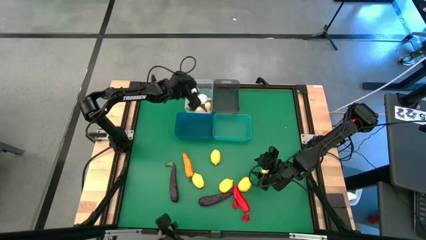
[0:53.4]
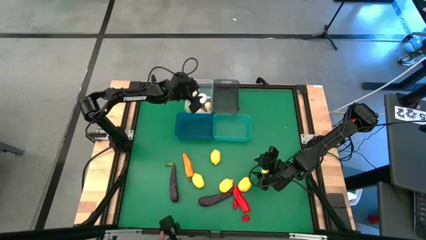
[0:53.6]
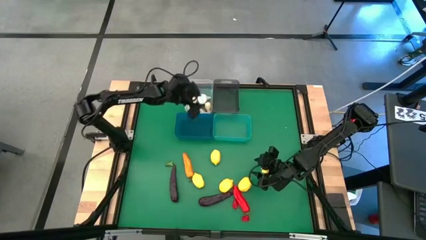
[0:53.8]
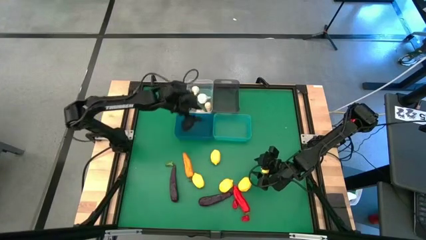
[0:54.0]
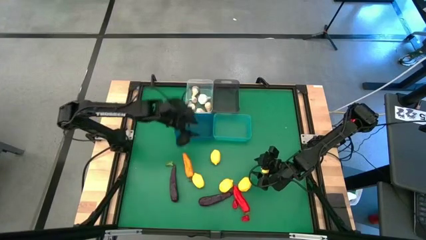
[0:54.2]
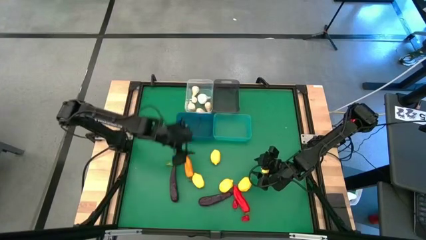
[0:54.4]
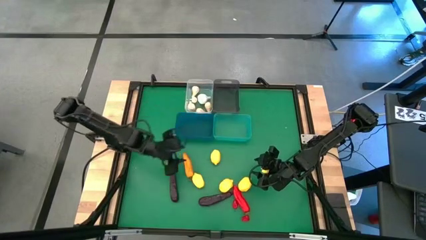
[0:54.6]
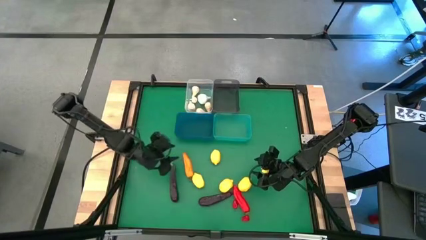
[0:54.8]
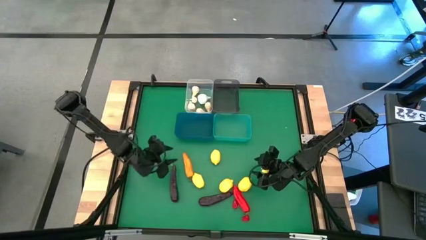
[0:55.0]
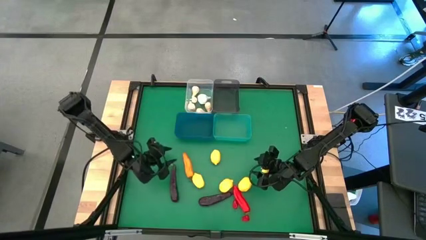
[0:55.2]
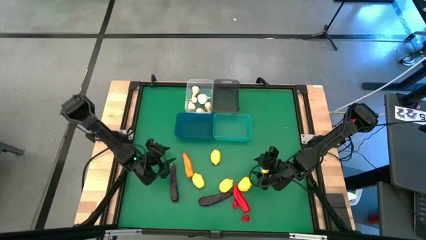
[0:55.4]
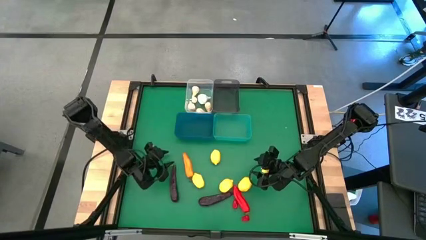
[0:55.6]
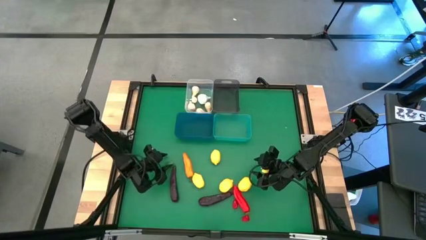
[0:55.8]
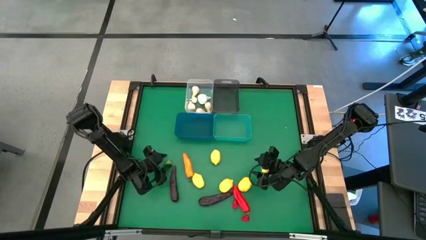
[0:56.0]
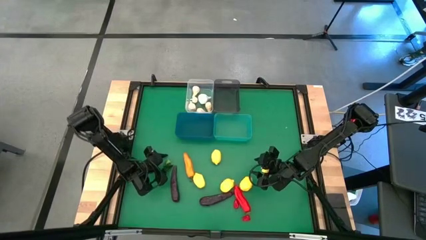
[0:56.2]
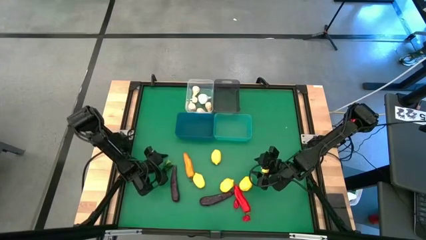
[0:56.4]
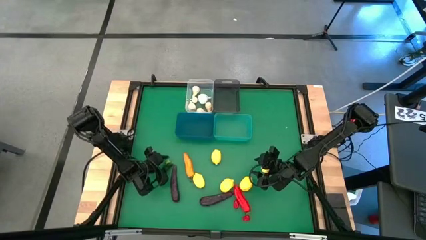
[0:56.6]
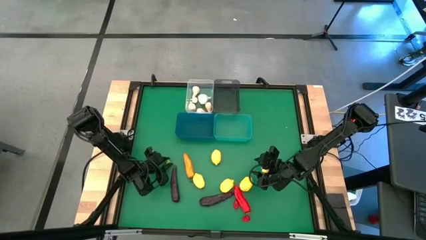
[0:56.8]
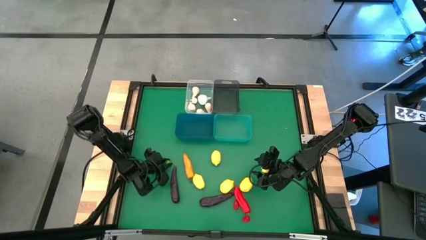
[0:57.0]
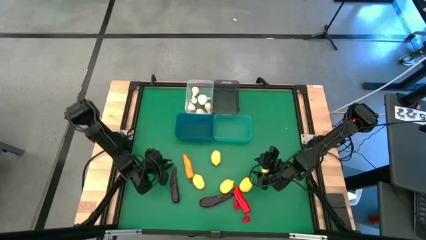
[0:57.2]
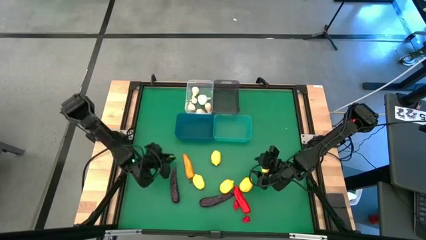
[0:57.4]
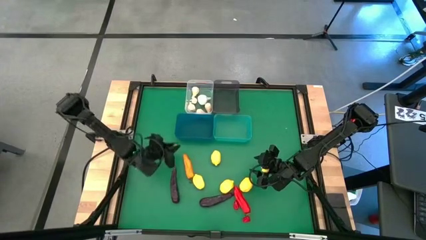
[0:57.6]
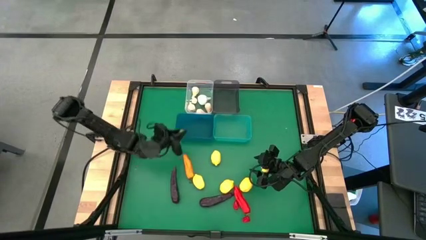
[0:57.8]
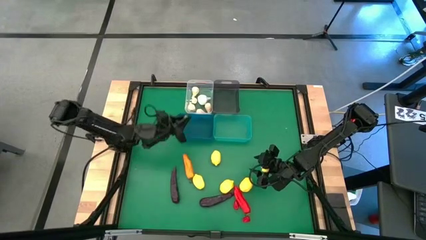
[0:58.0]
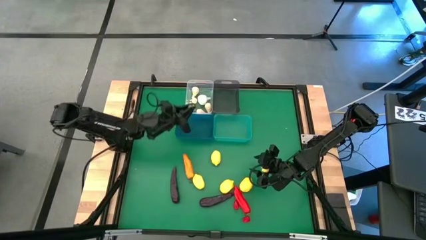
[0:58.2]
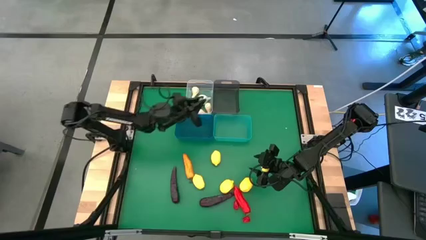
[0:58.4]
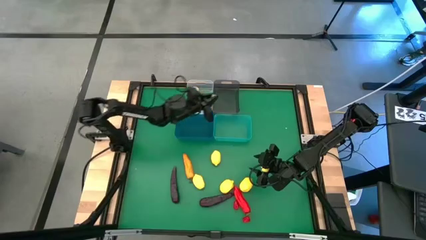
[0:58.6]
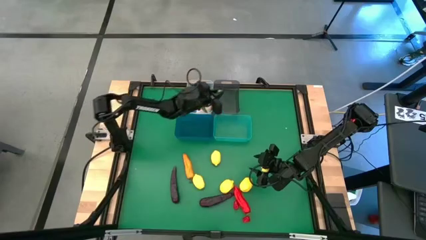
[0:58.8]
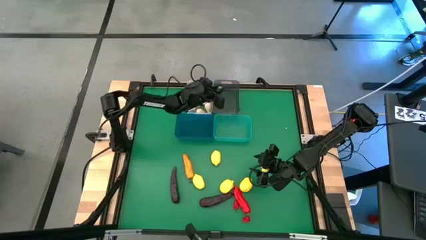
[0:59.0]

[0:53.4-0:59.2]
Task: Sort produce into baskets
Put the green chili pepper into the black bin

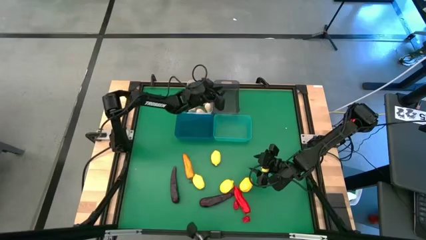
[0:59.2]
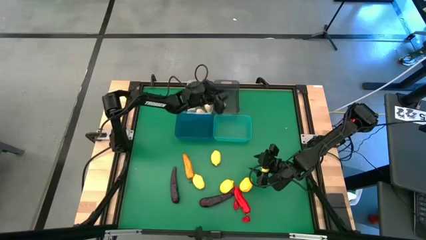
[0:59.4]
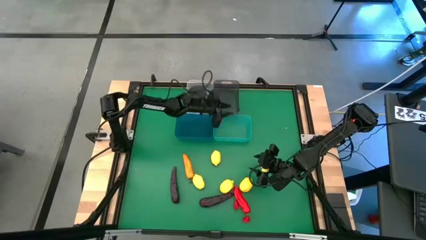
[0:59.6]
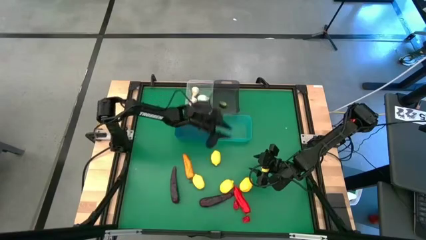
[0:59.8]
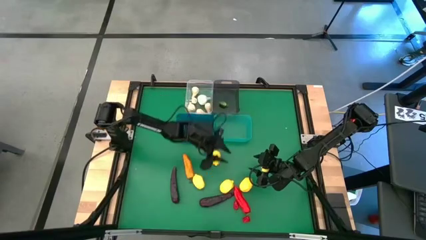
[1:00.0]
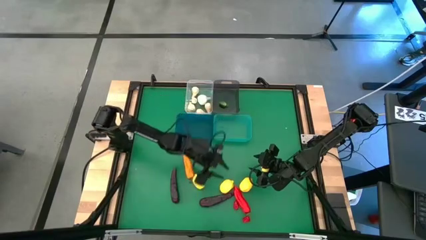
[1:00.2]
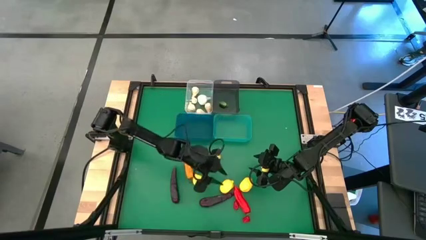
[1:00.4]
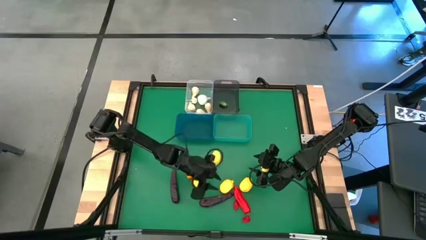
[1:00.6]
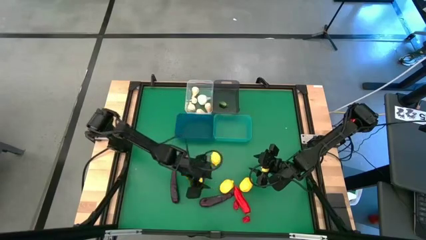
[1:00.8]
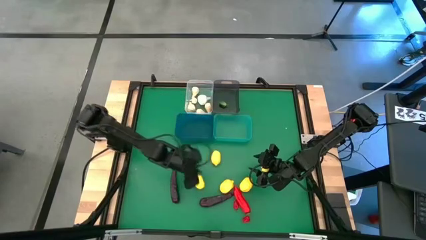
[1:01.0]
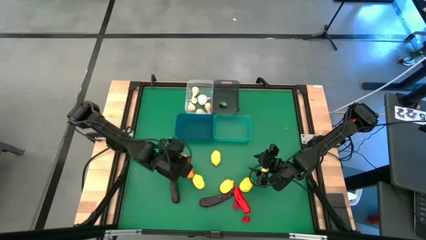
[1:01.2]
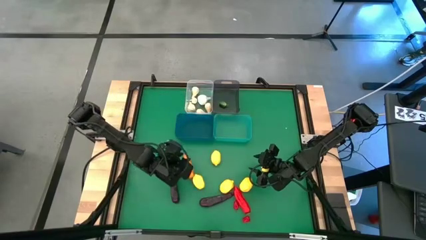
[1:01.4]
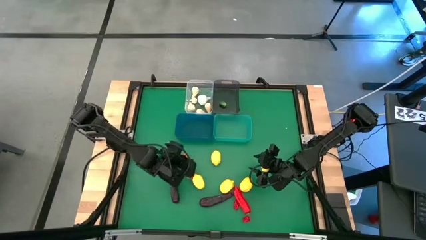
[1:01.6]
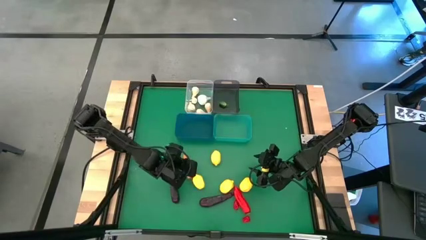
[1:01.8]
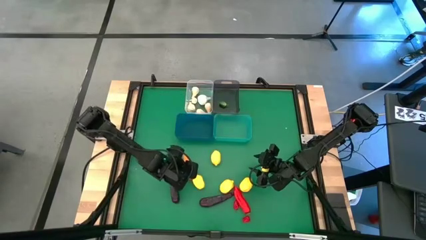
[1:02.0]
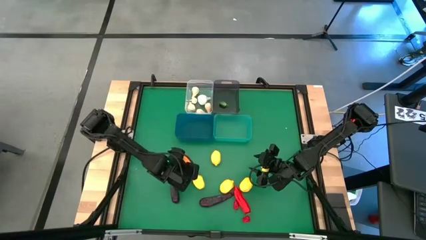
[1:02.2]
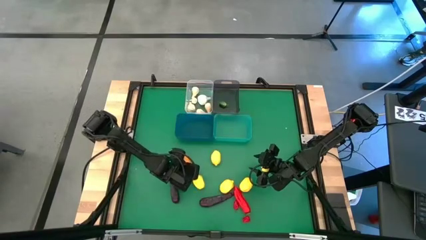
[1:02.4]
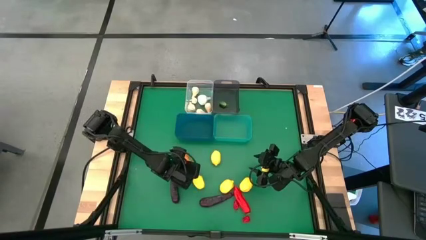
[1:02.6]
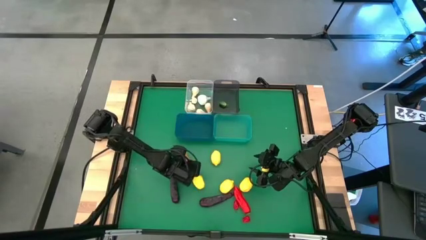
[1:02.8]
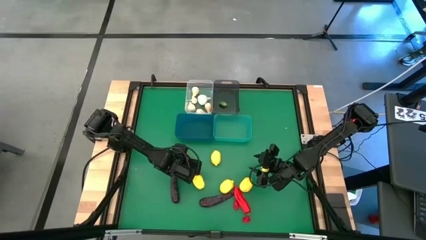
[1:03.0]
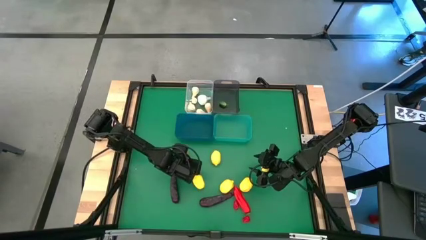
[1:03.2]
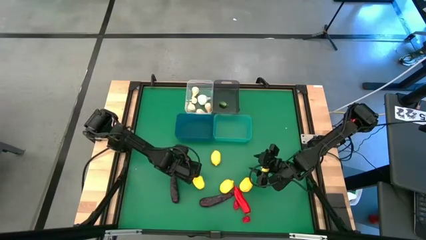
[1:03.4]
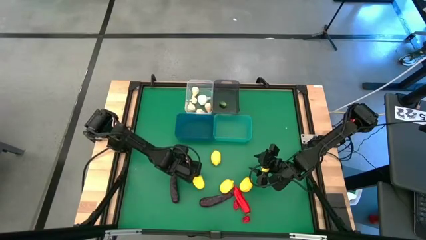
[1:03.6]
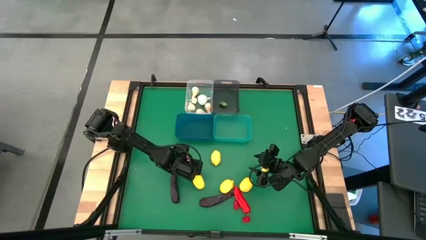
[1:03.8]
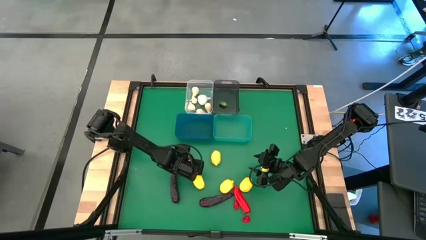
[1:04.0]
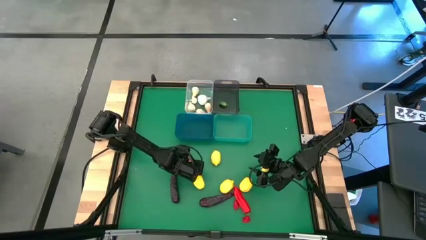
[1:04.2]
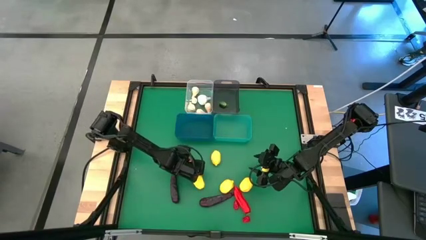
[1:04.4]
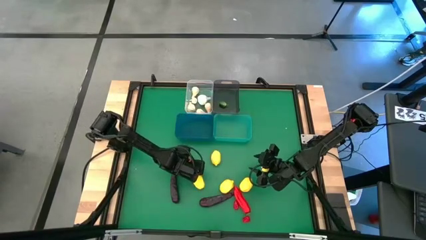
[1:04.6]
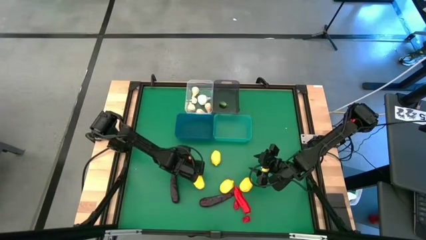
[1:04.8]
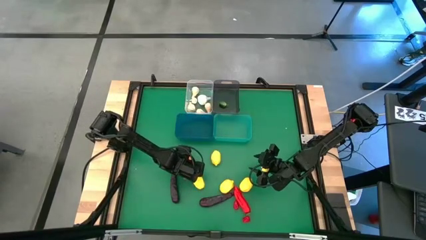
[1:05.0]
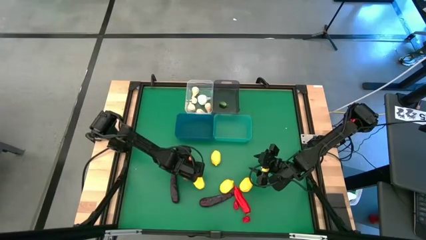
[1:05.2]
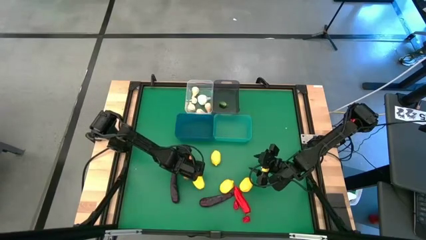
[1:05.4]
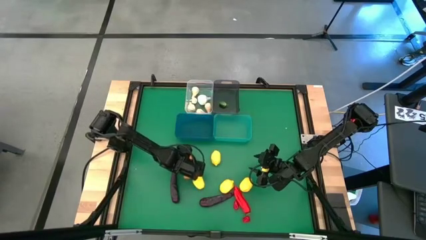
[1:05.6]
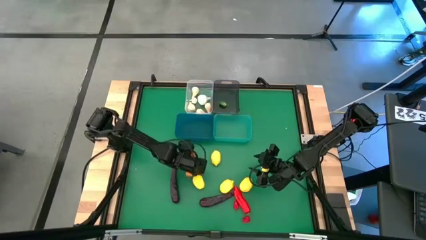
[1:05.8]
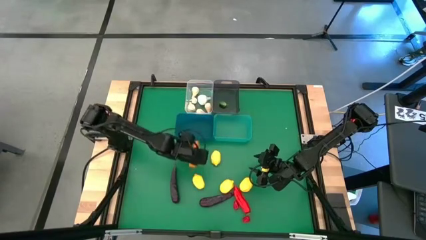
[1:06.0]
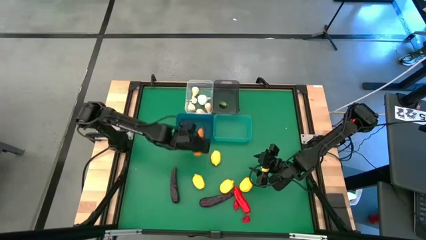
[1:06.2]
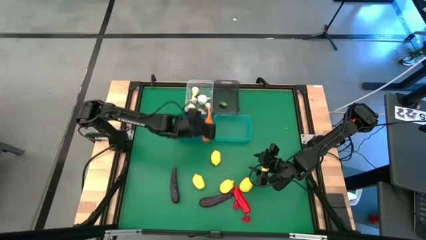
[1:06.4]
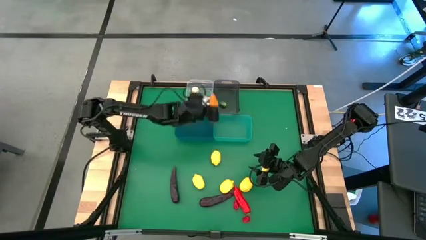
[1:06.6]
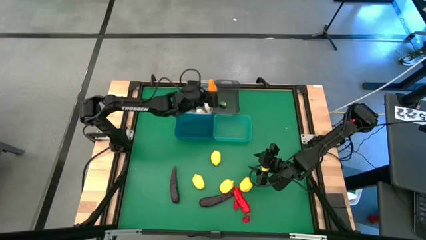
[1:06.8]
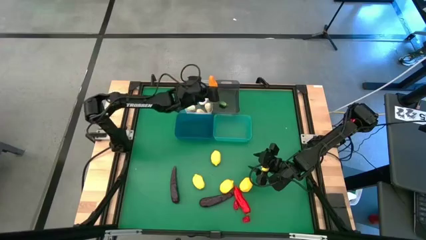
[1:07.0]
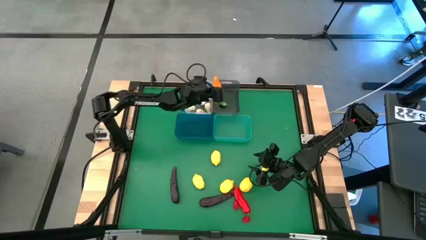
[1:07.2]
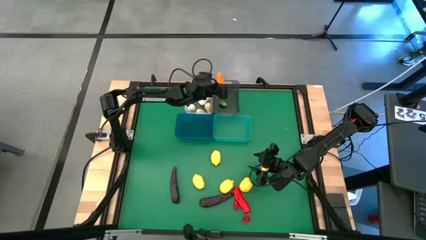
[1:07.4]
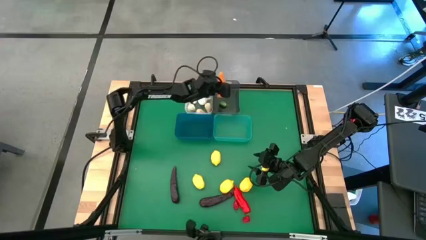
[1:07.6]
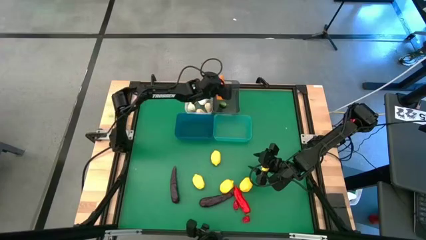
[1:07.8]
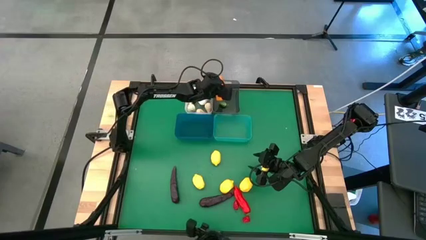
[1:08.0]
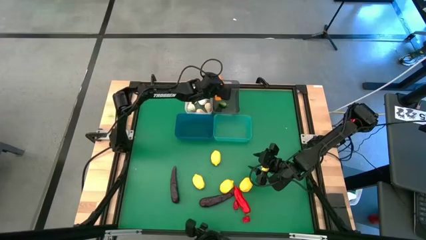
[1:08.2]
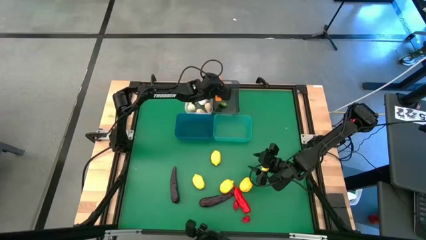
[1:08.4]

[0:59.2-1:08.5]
Put the orange chili pepper into the black bin

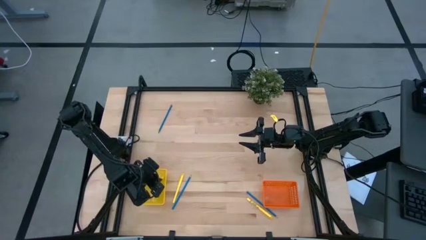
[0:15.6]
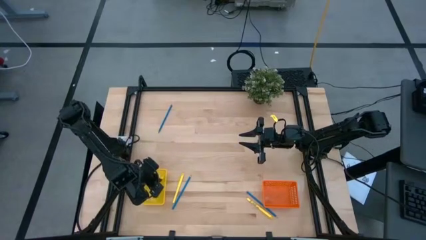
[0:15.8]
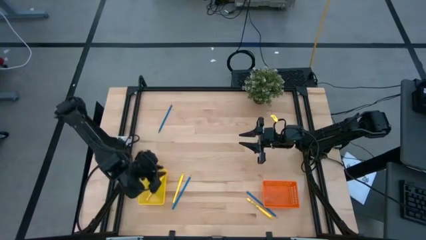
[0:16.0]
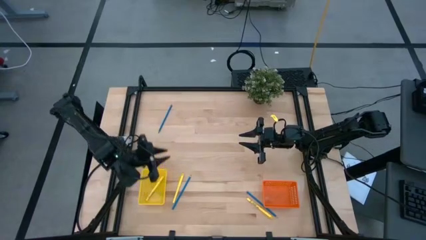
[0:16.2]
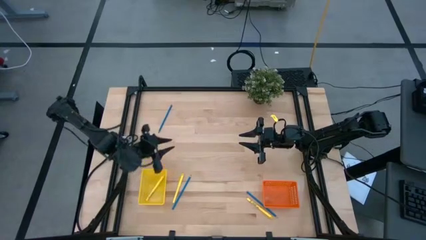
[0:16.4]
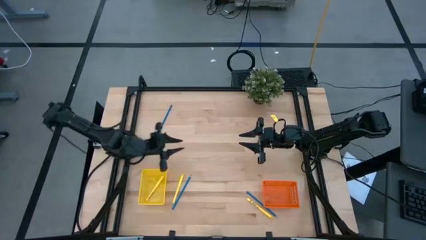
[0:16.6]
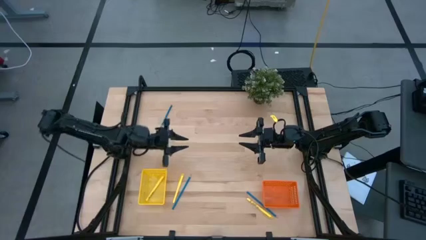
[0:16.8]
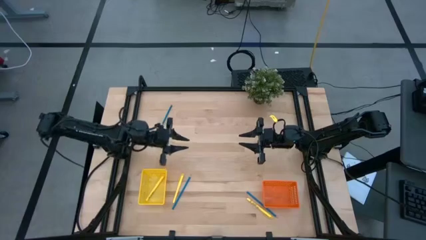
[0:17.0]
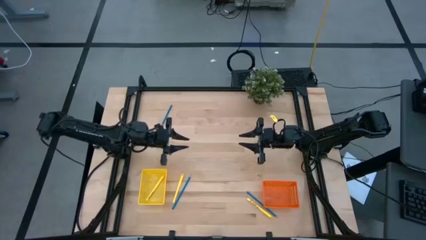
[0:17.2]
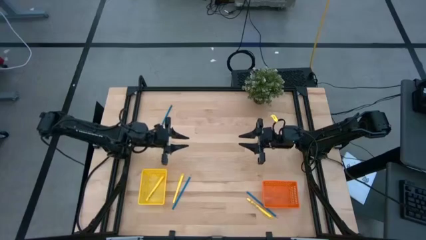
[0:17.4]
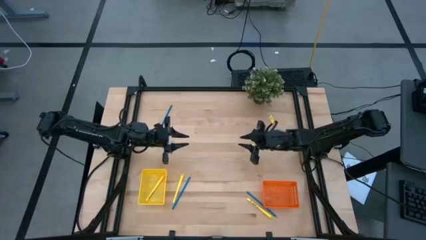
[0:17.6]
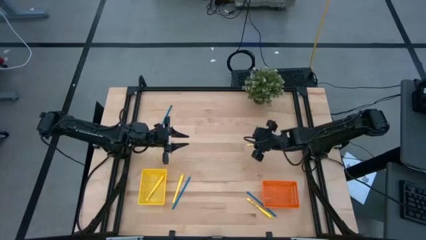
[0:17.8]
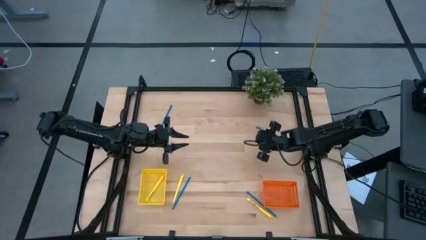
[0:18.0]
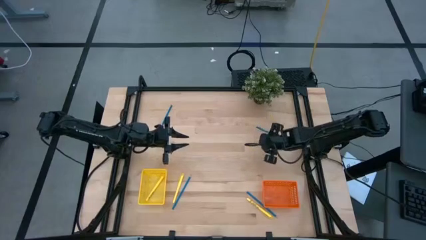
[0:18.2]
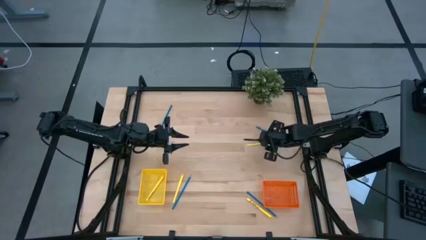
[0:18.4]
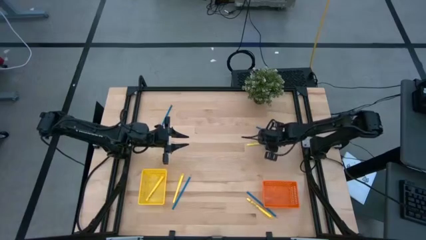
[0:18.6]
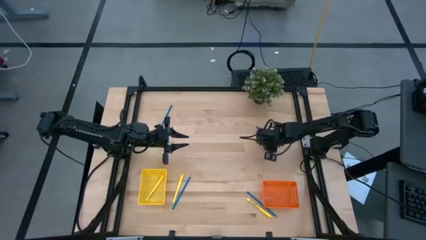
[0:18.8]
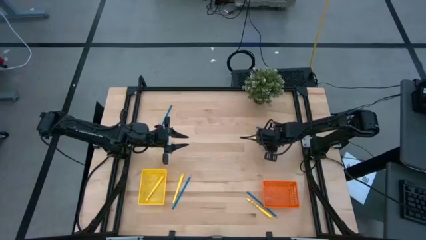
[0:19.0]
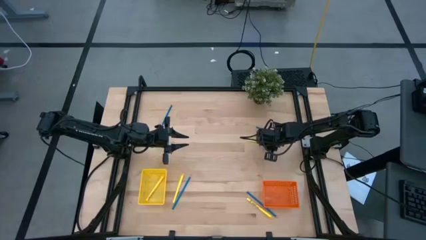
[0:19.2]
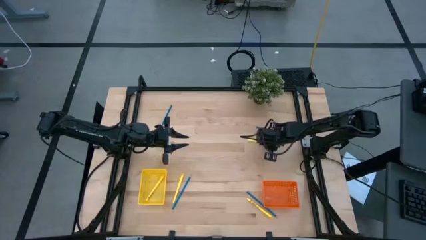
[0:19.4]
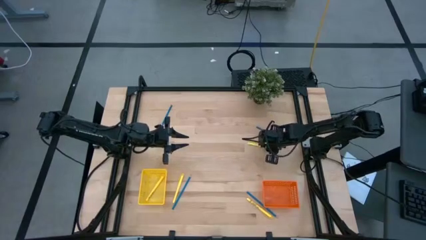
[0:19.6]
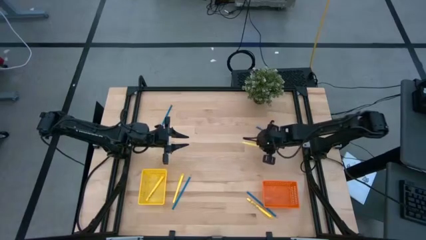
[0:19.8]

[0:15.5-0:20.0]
Task: Sort pens & pencils
Put the top yellow pen into the yellow bin
